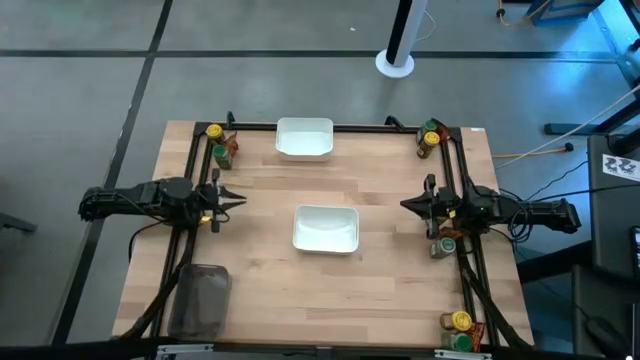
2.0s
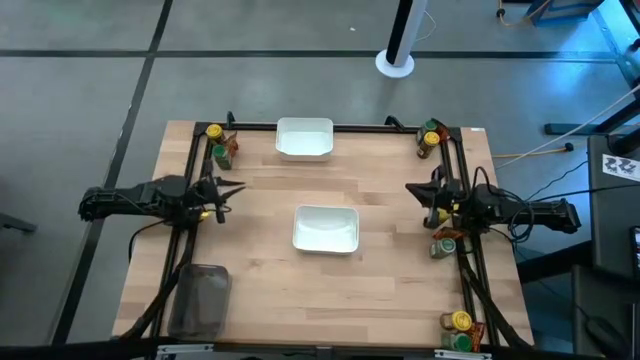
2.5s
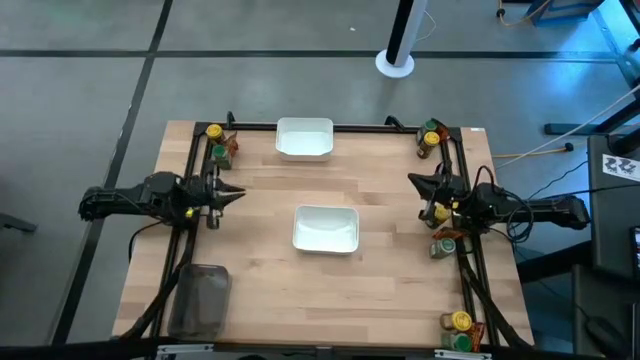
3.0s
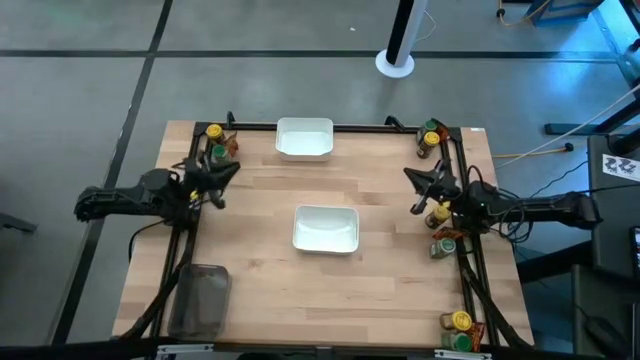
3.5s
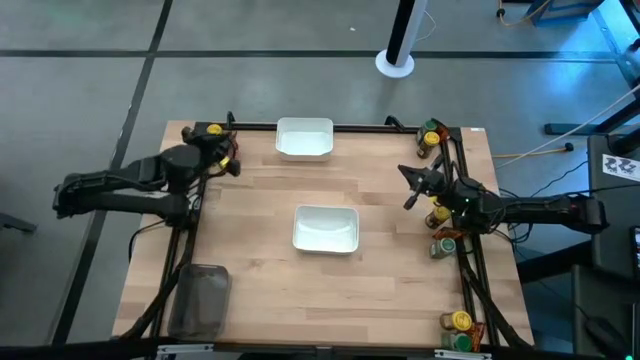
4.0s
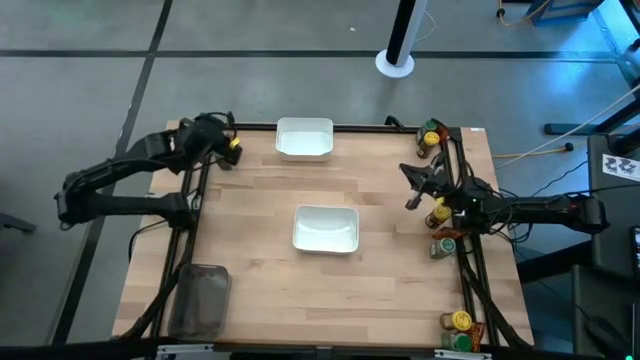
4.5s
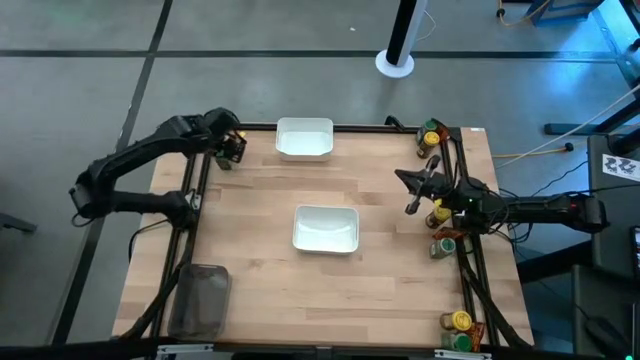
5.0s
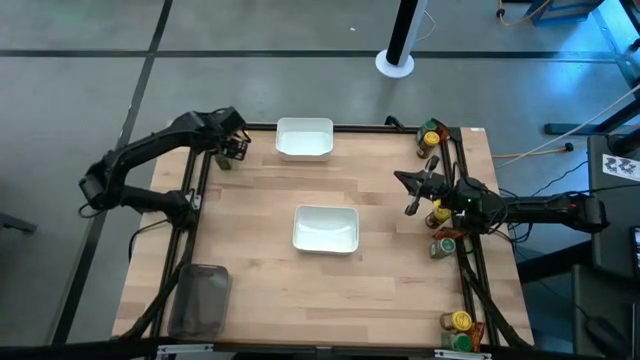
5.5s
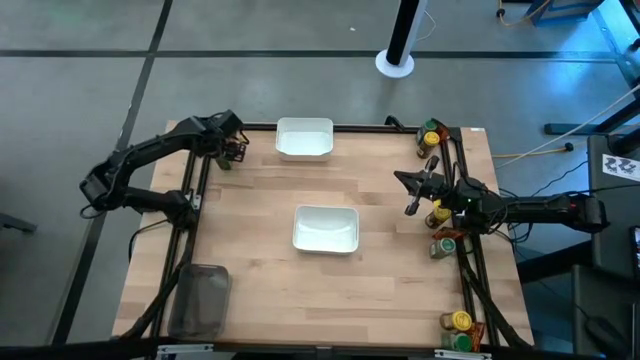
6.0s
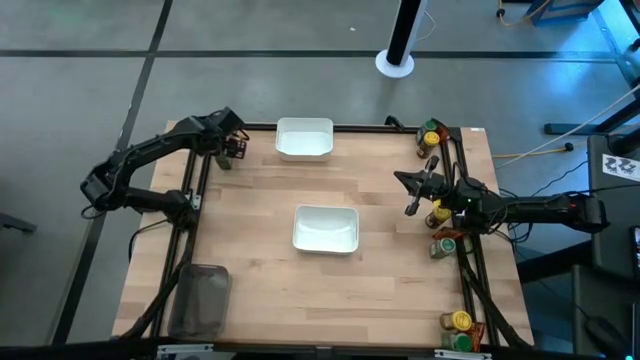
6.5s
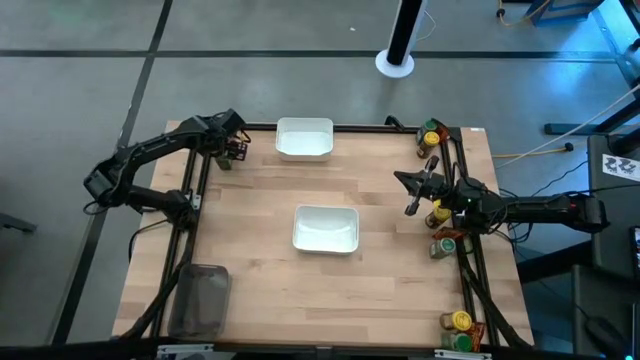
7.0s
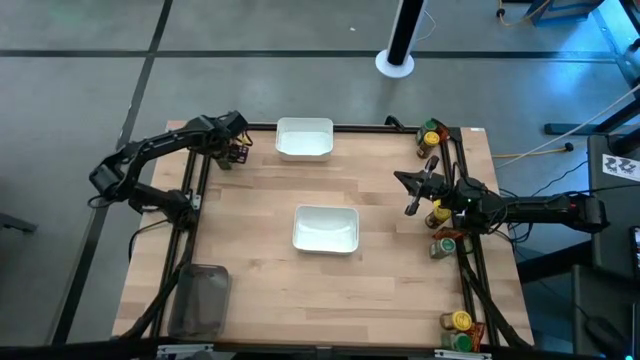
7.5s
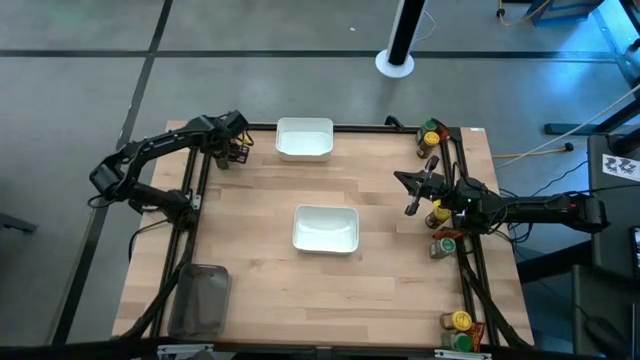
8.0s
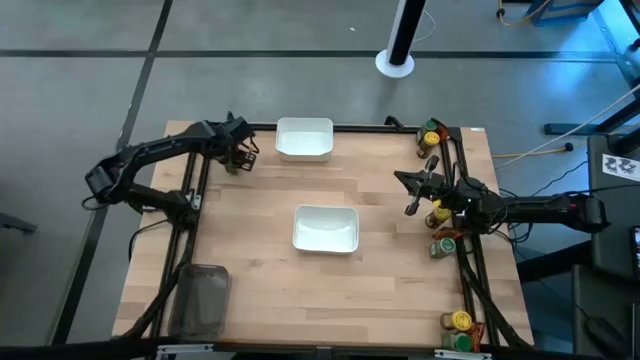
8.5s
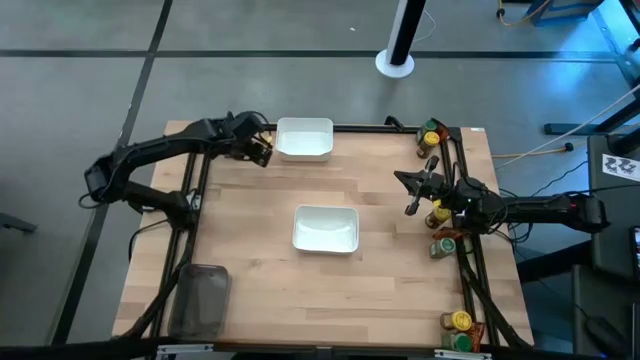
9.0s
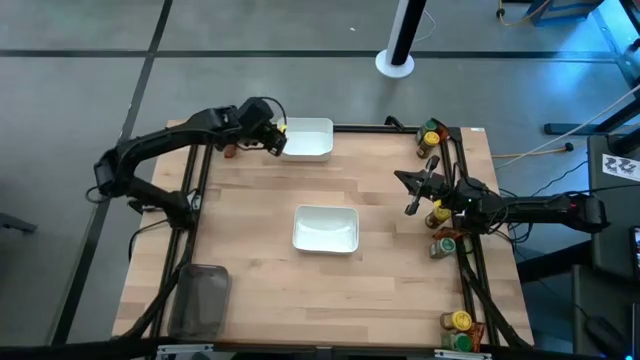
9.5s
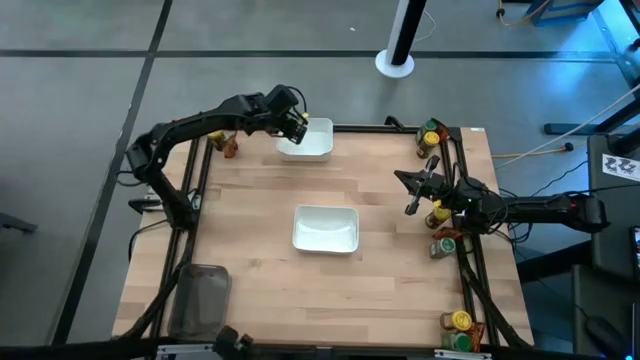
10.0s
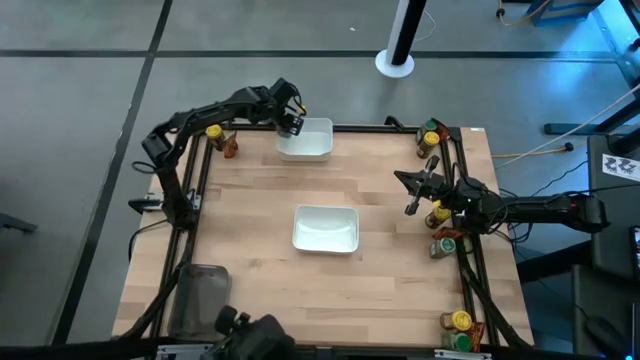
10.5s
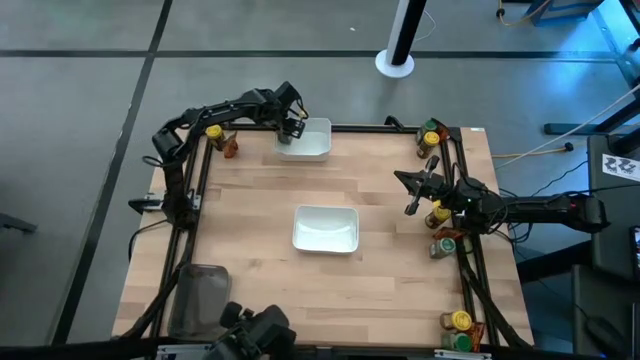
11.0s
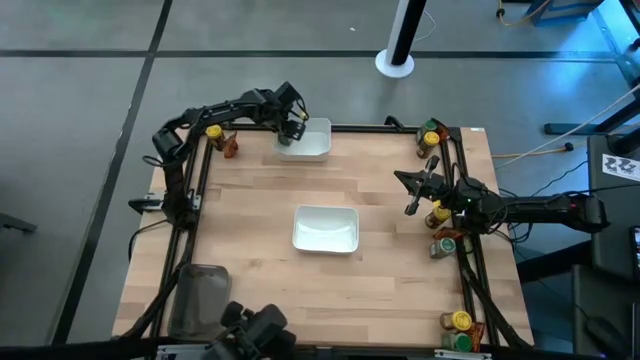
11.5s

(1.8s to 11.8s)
Task: Sort spices by type
Put the top left green seasoning bottle into the top white bin

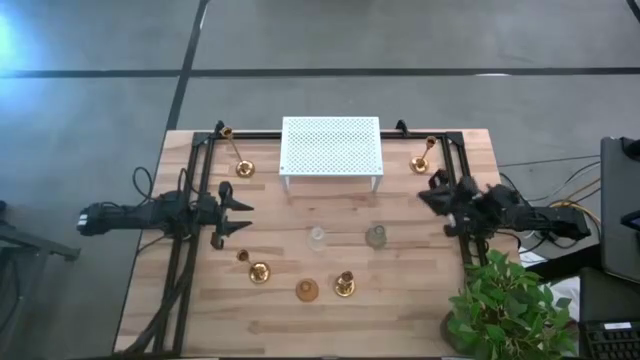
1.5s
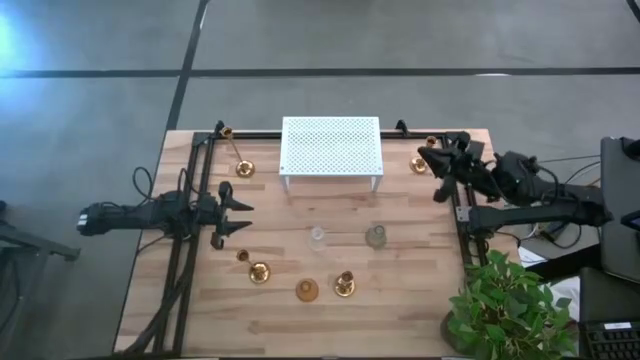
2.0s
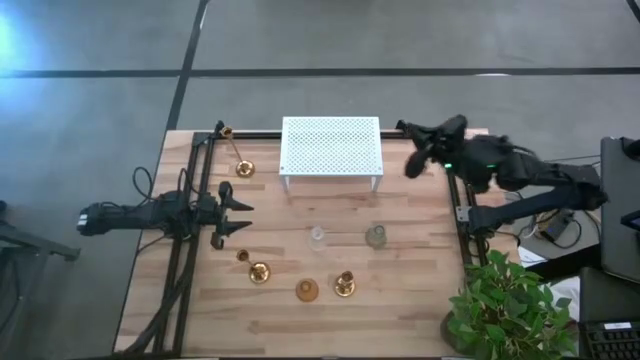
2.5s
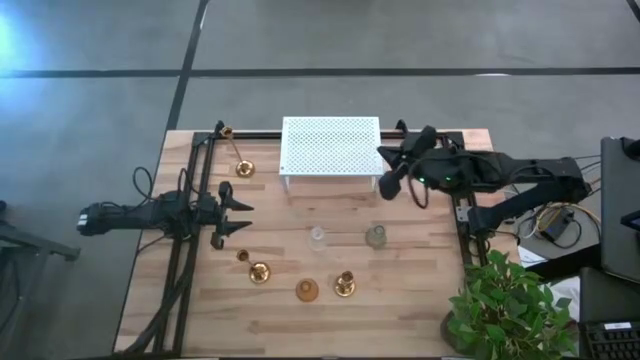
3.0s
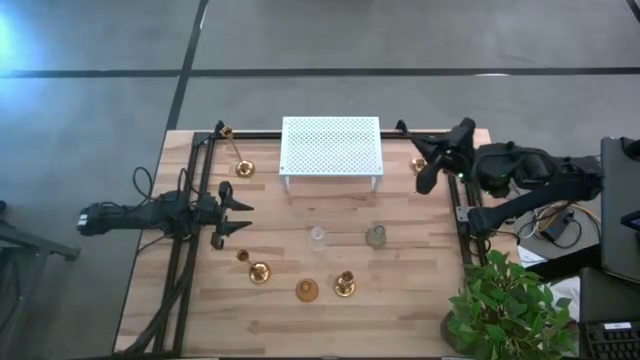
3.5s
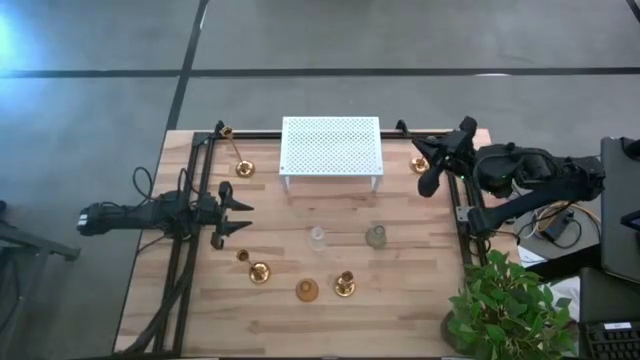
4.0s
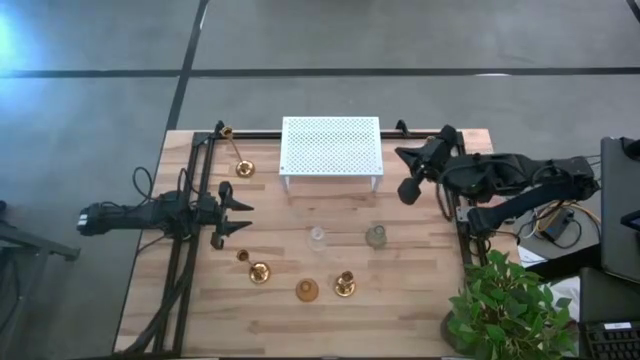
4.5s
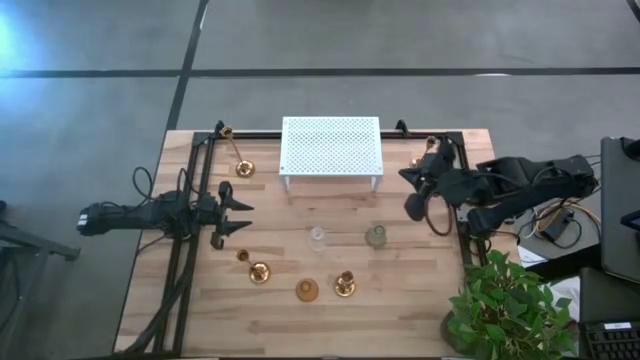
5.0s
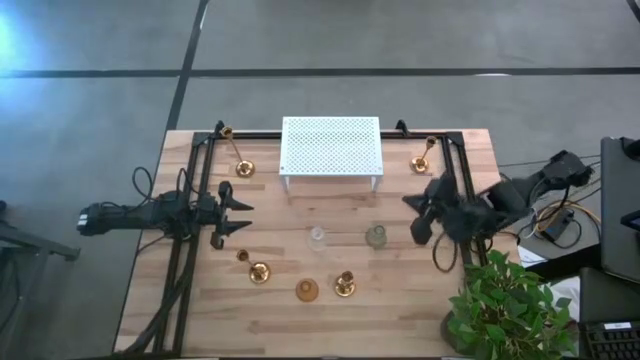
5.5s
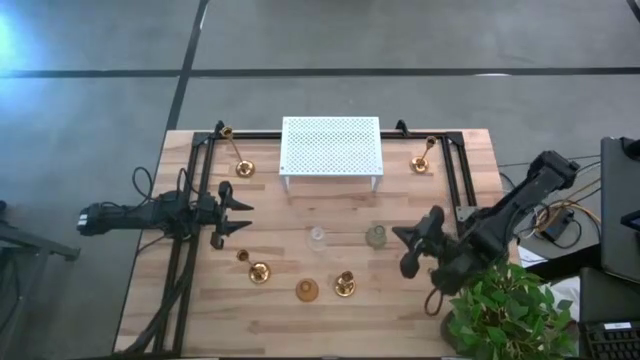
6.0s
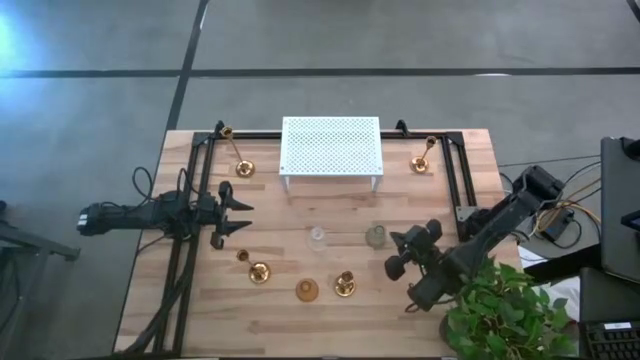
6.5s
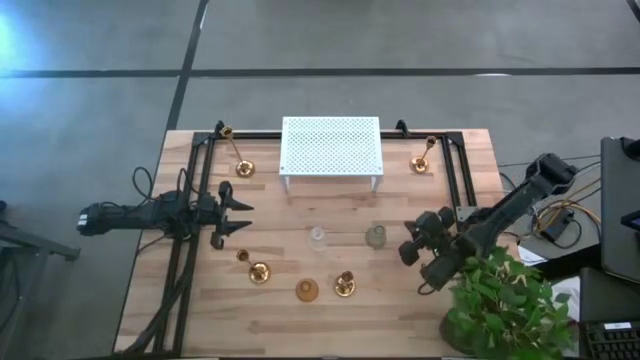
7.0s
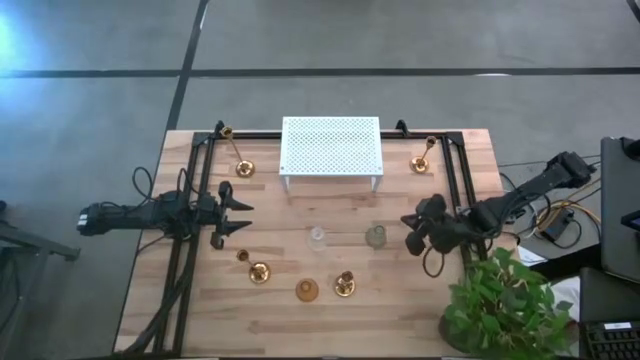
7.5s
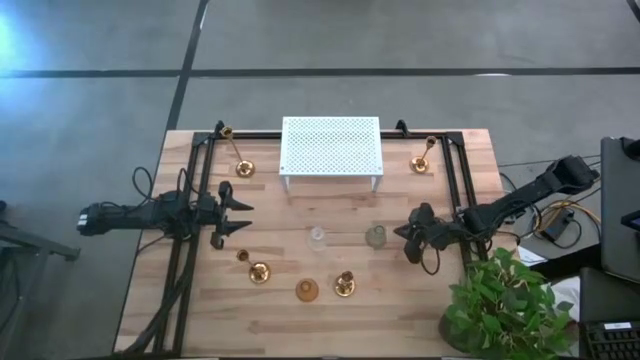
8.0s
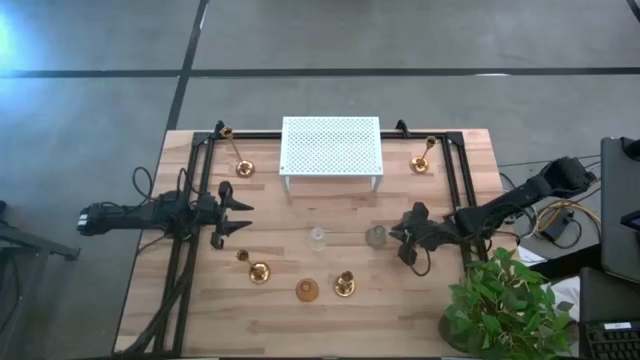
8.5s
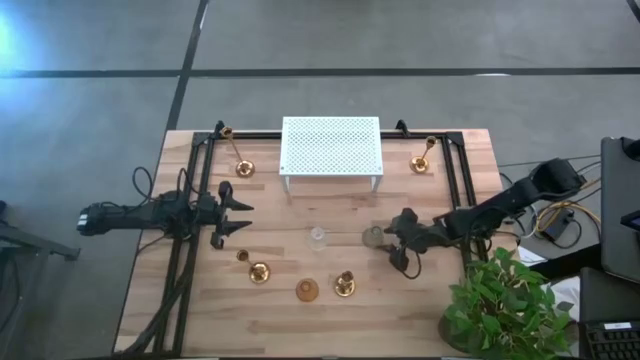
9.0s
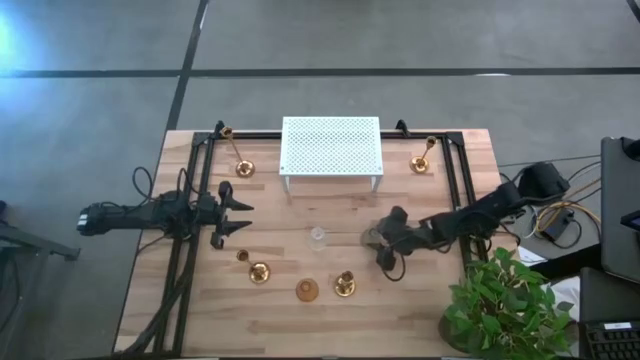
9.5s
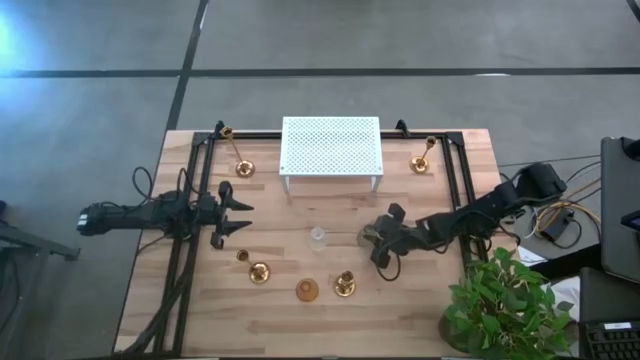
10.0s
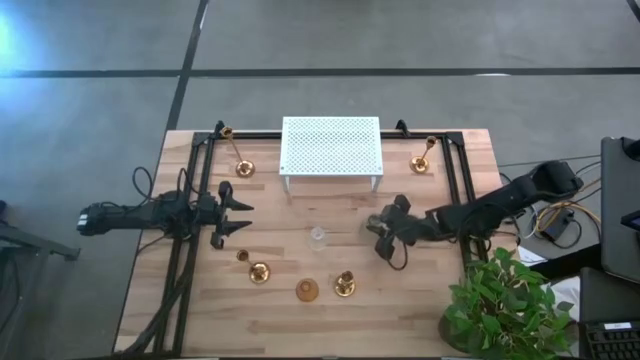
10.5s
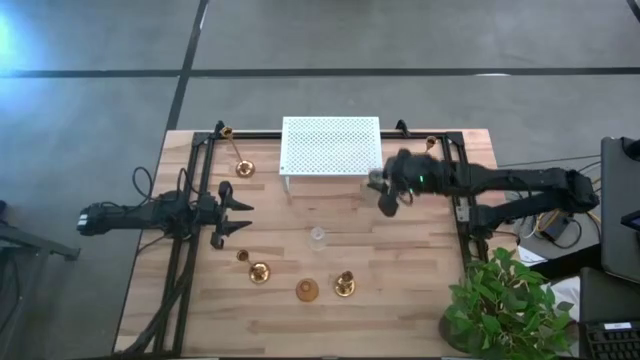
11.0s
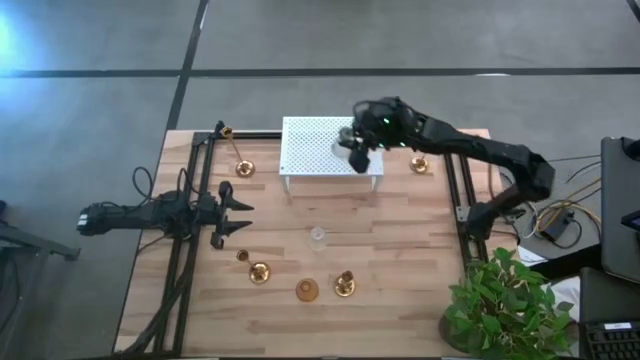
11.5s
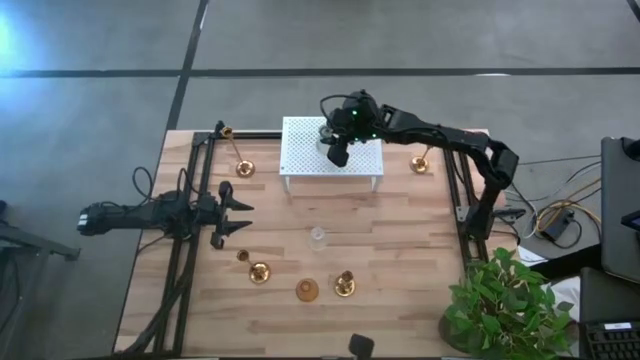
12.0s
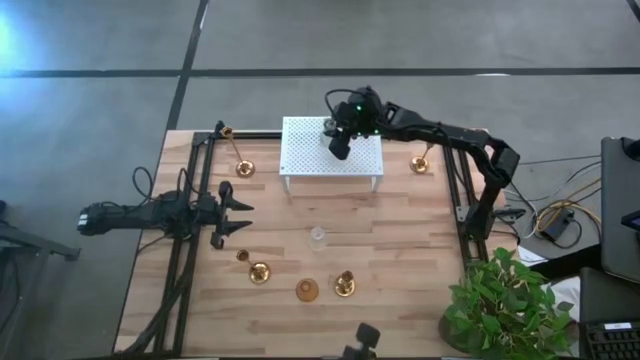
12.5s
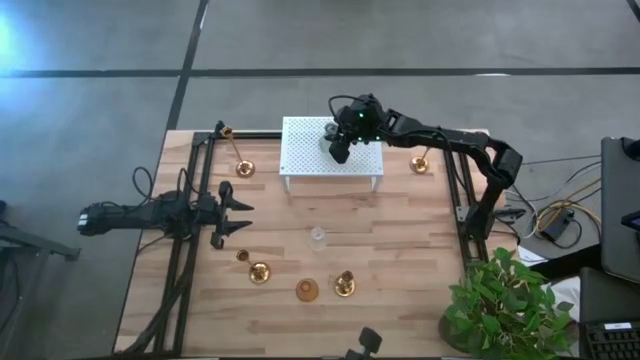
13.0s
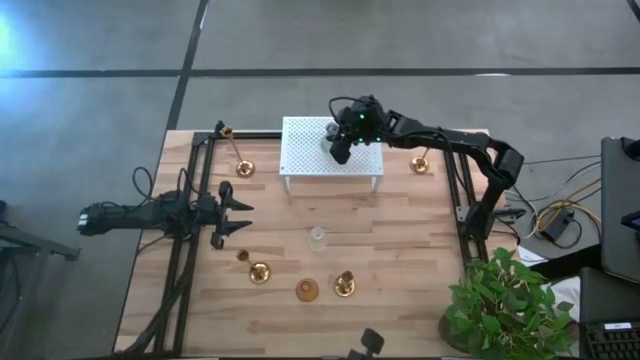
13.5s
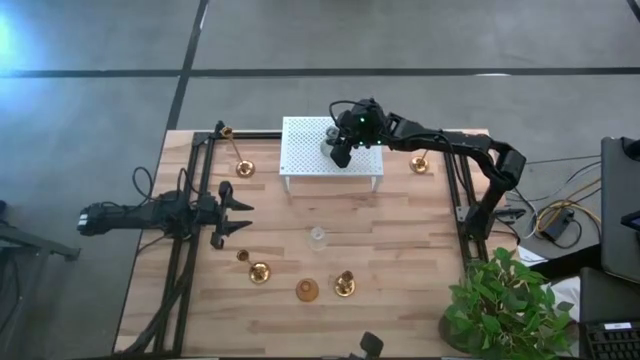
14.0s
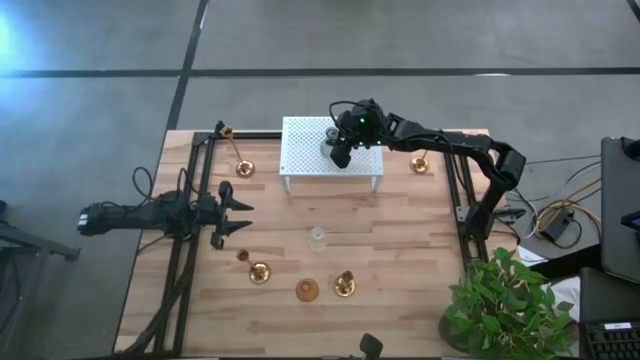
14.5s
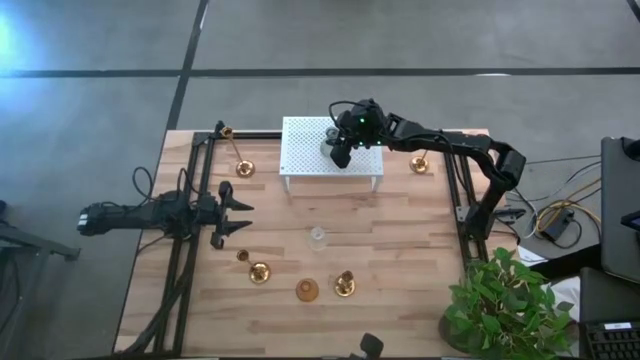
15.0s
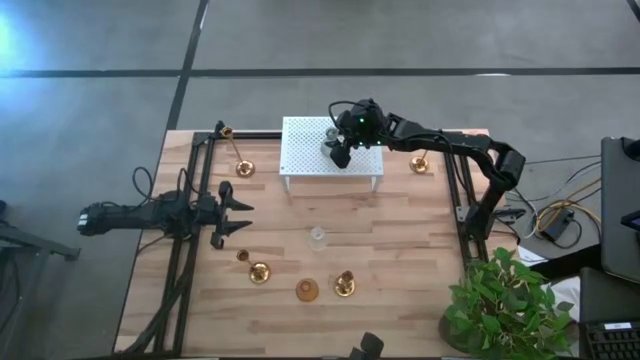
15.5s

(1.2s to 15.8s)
Task: Pick & Place candle stick holders
Put the green glass candle holder on the shelf
